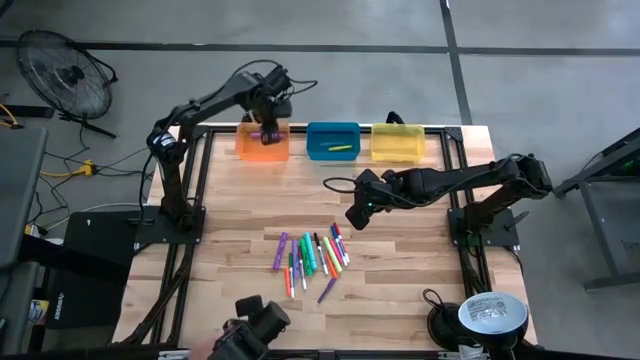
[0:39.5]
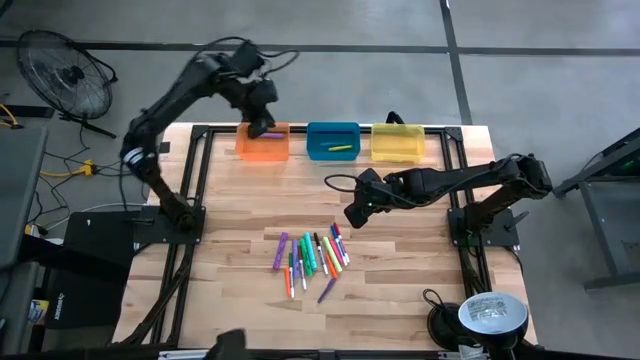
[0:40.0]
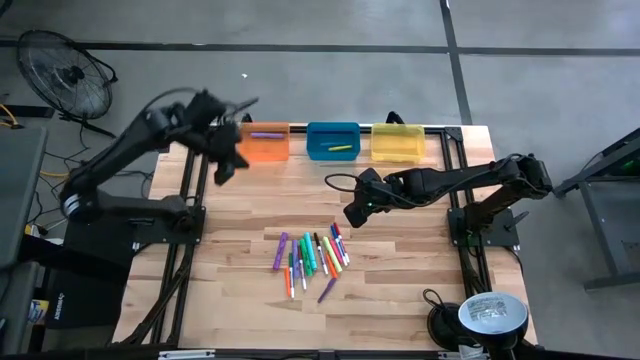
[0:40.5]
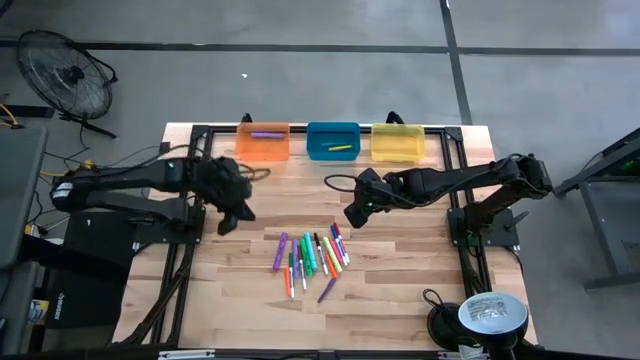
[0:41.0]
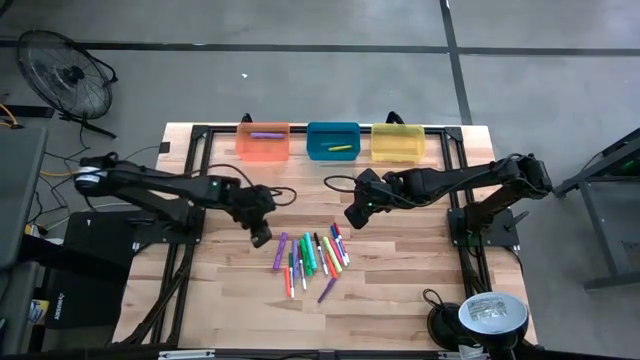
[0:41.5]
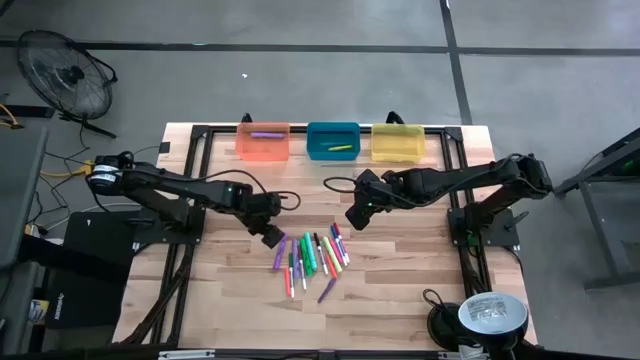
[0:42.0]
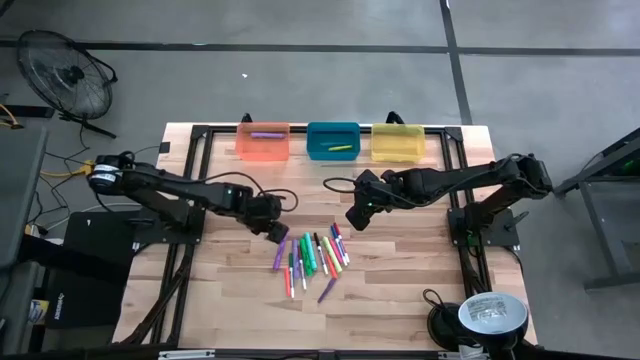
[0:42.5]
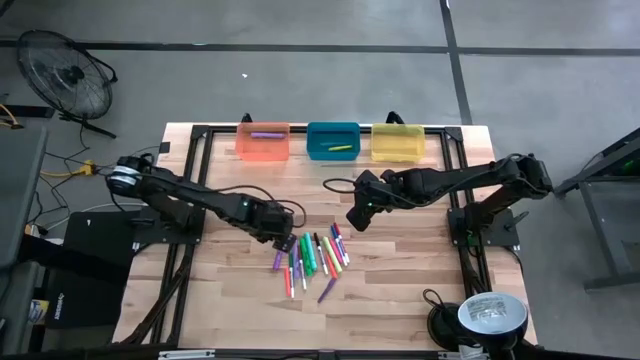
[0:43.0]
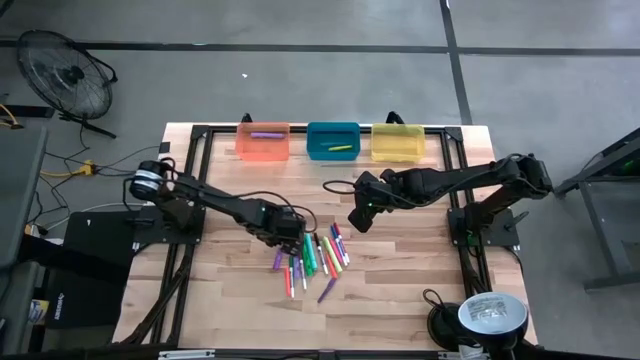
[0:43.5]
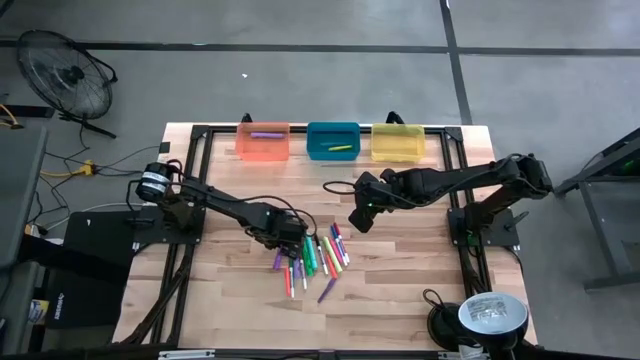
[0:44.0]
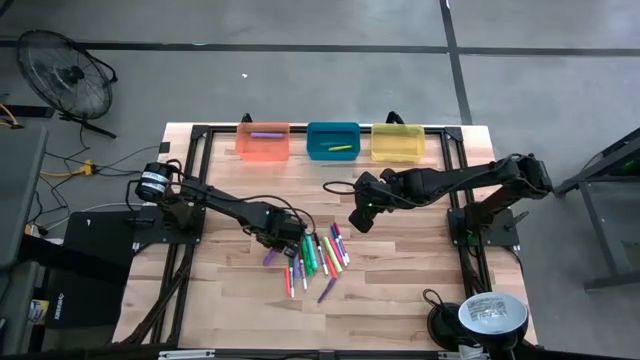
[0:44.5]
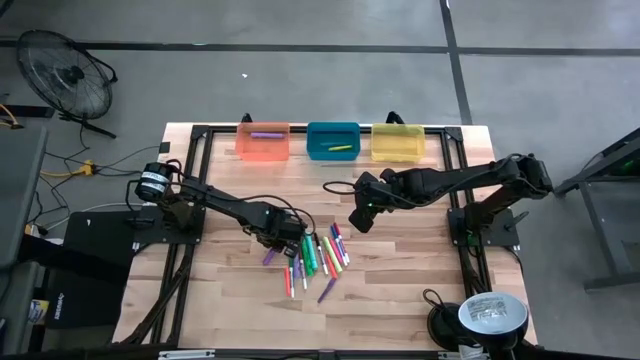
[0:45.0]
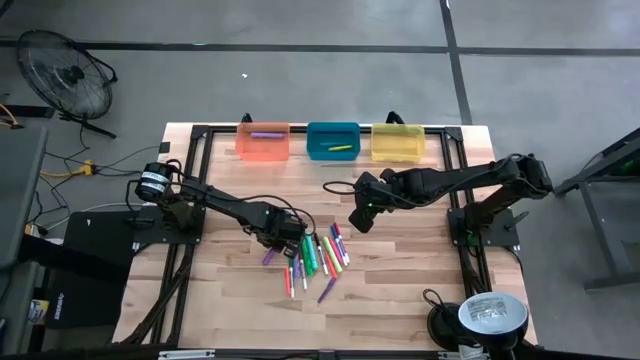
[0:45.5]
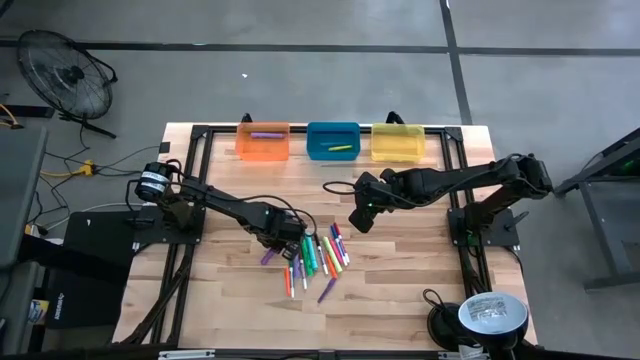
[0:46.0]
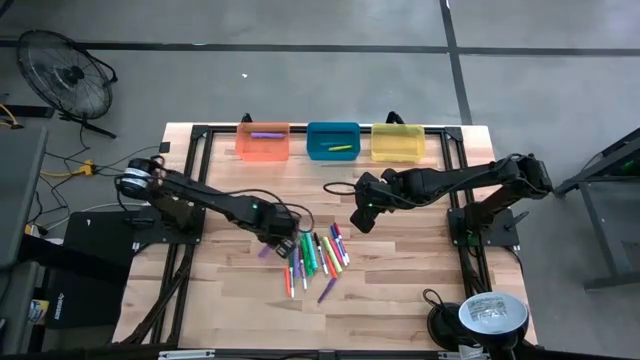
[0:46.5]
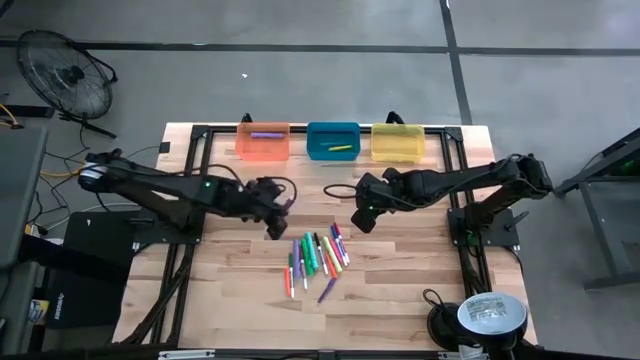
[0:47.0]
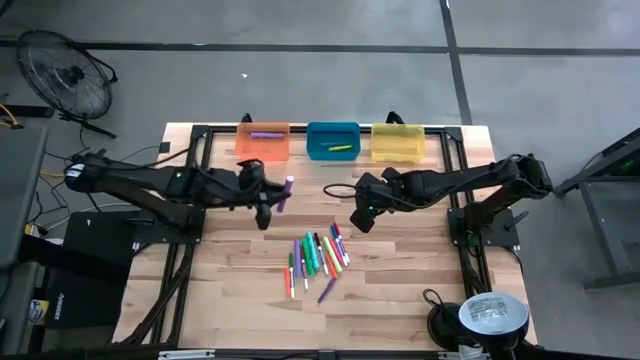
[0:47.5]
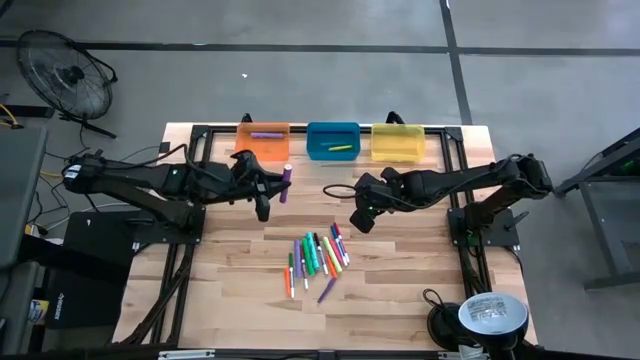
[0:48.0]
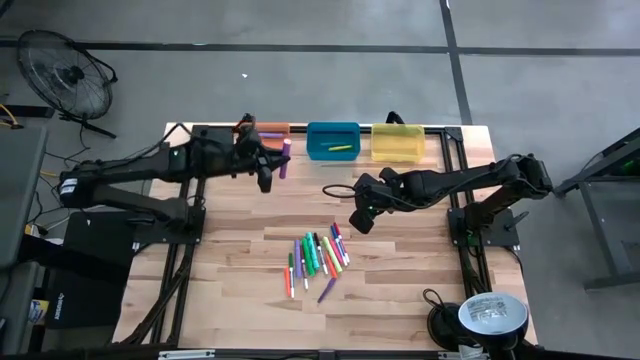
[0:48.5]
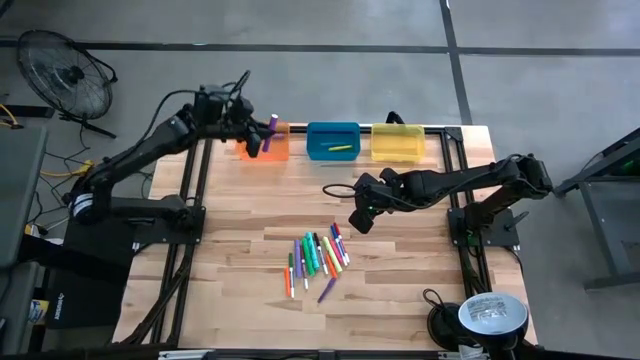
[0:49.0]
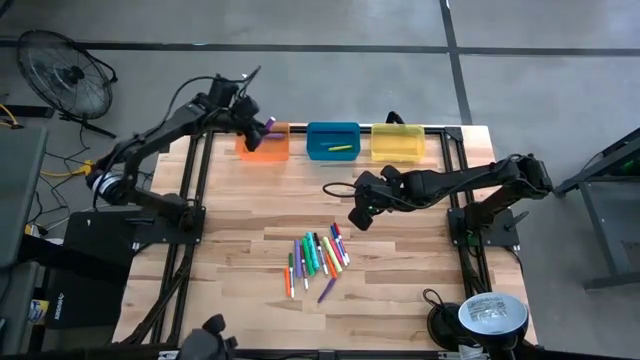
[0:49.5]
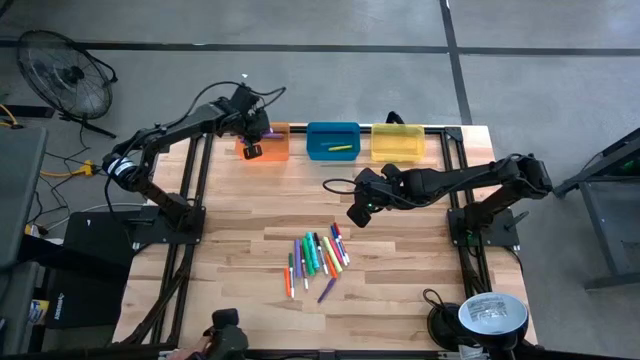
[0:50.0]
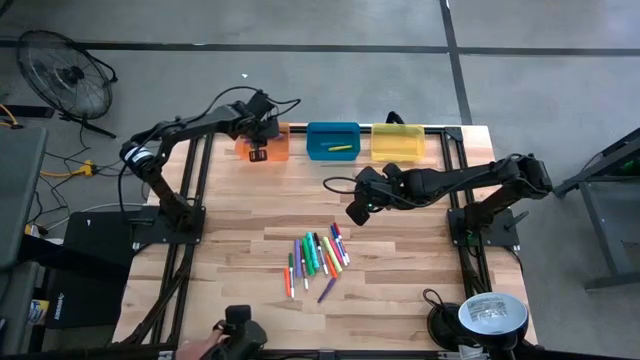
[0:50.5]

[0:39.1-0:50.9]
Task: Pick & Place Markers
Put the violet highlighter into the orange bin

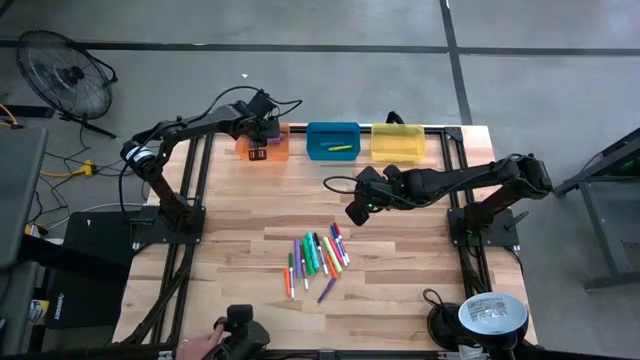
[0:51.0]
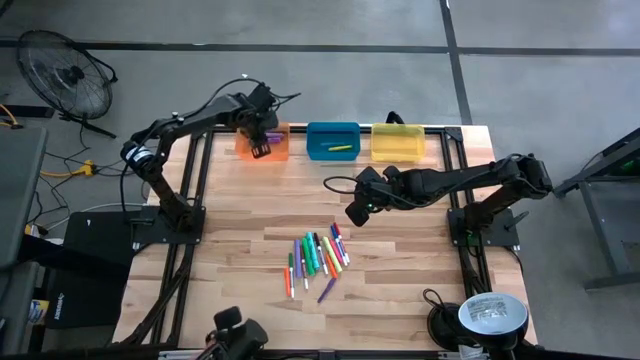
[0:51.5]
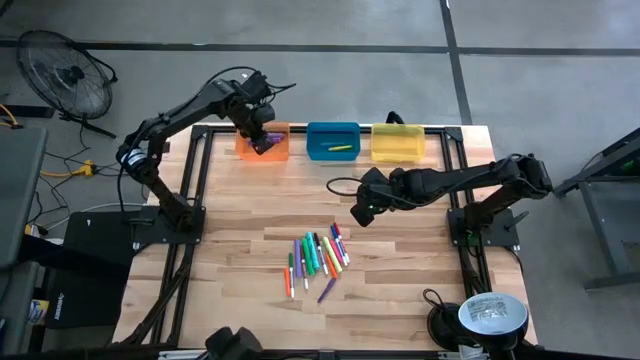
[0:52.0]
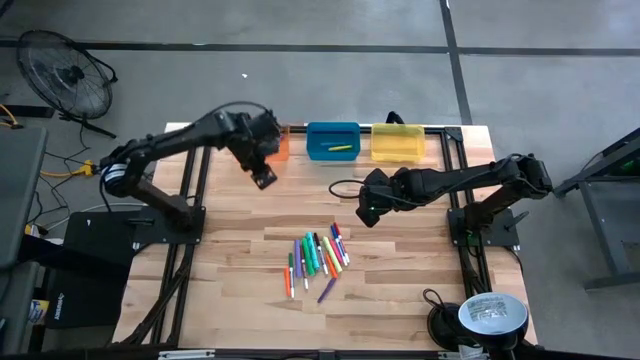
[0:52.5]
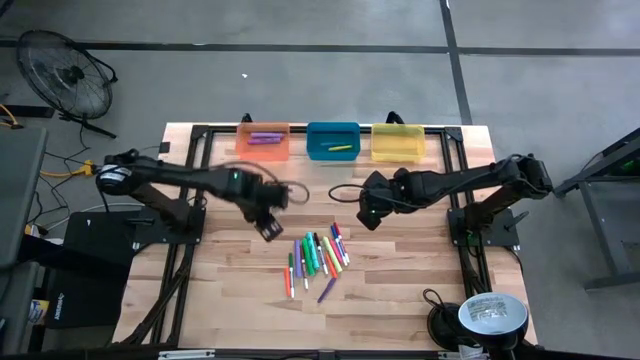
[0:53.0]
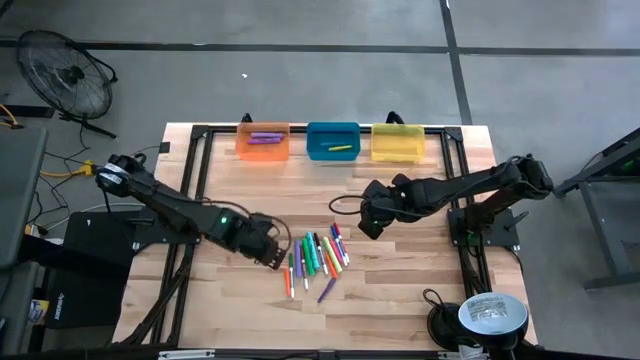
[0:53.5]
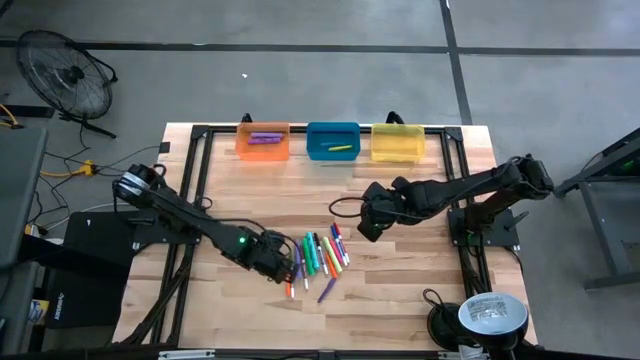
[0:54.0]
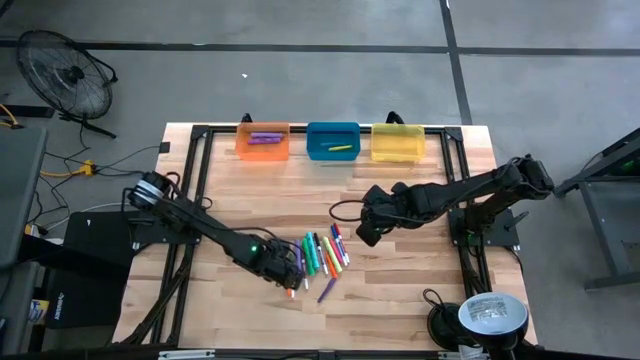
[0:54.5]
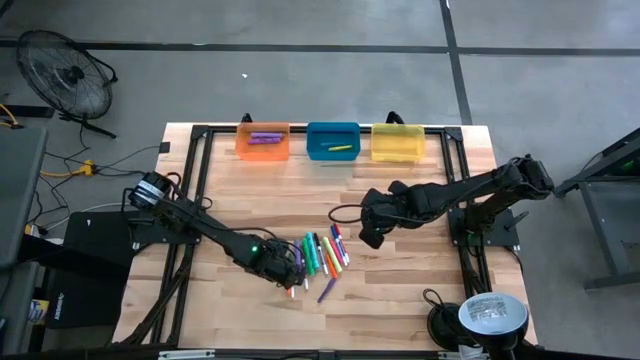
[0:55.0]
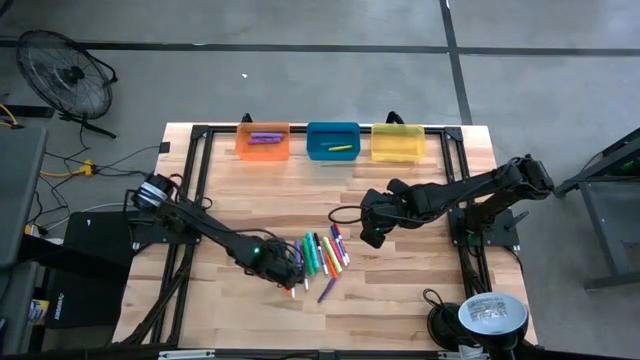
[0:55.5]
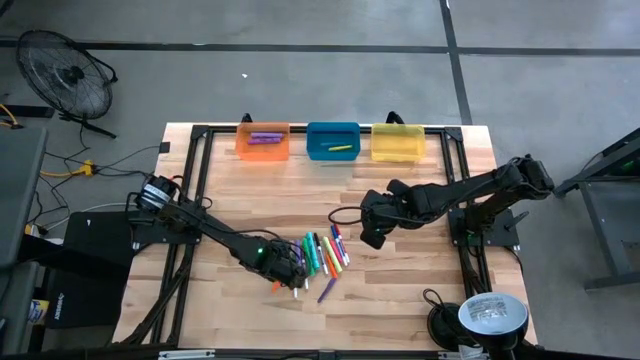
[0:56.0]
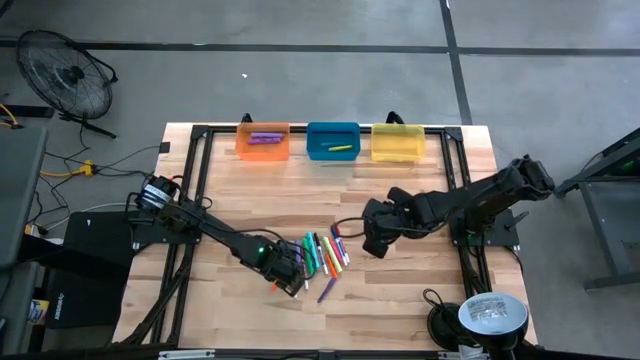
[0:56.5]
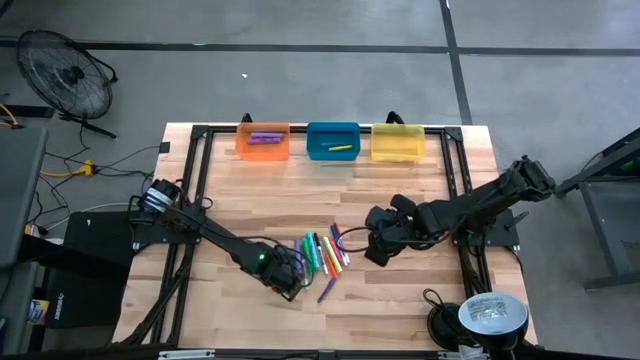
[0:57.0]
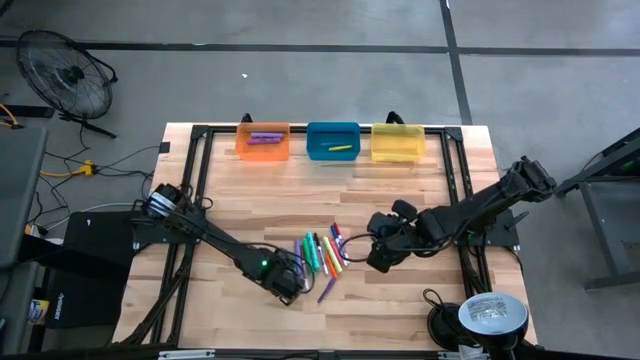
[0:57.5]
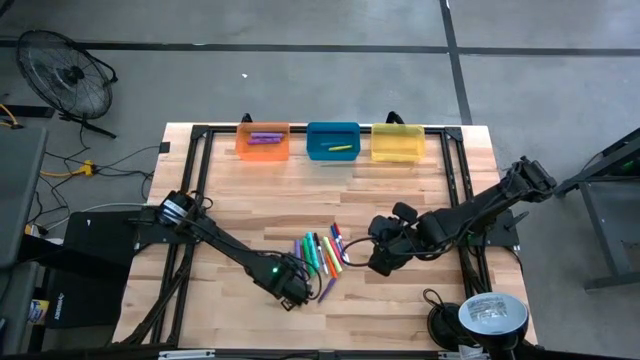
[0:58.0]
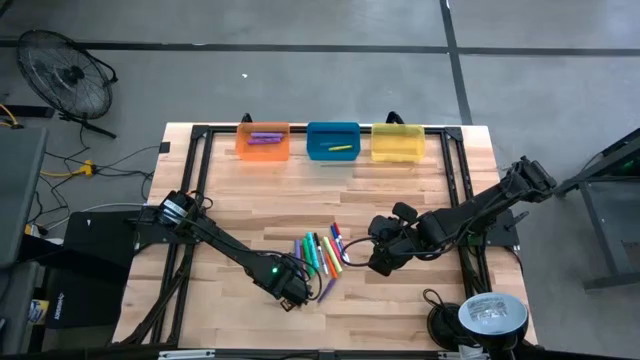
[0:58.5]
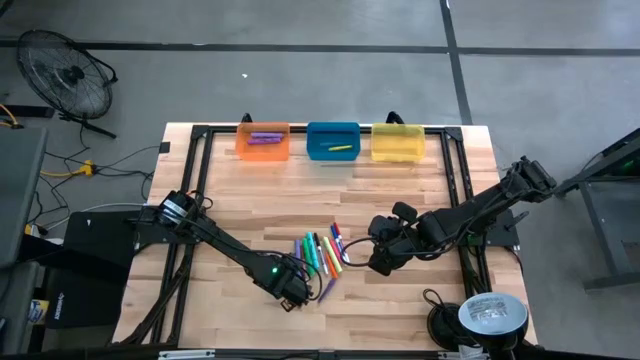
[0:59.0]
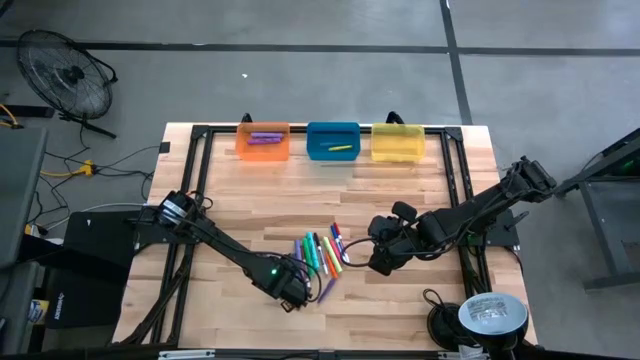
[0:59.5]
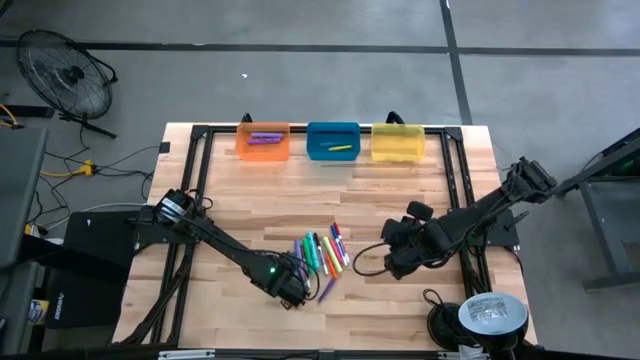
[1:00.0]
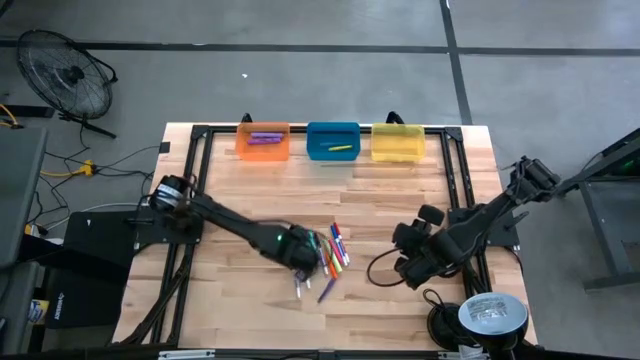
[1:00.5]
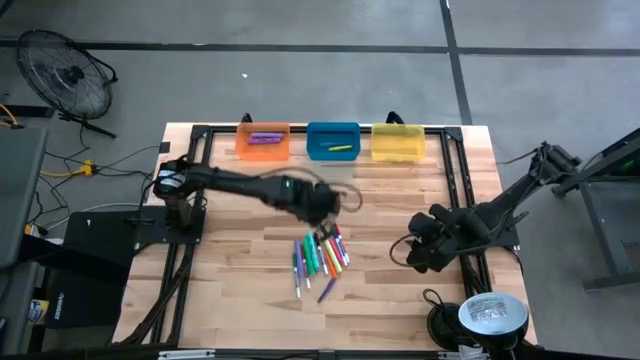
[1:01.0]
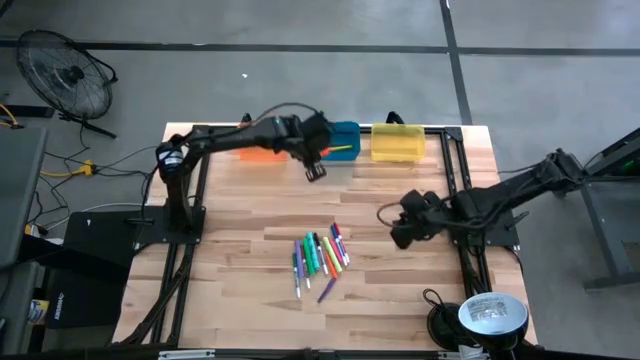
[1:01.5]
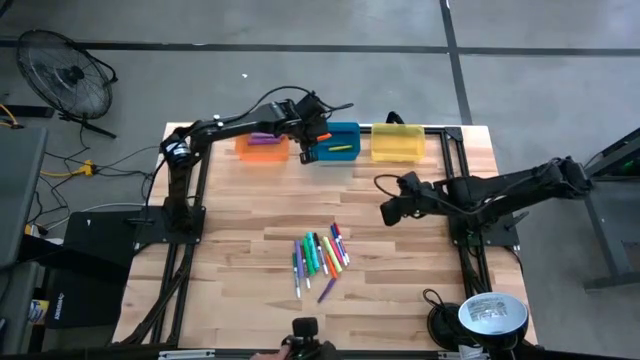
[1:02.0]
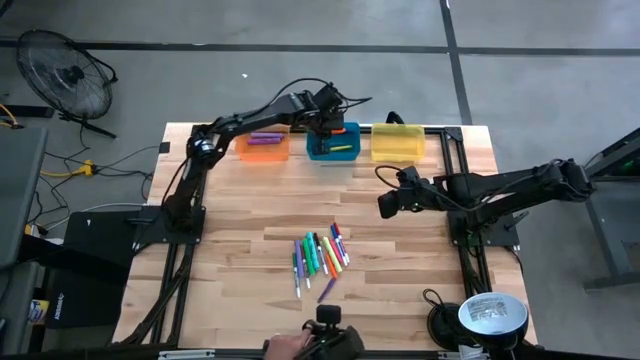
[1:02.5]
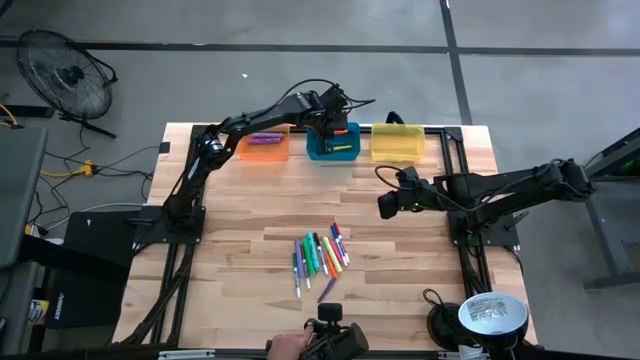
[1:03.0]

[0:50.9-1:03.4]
Put the left orange pen into the blue bin
